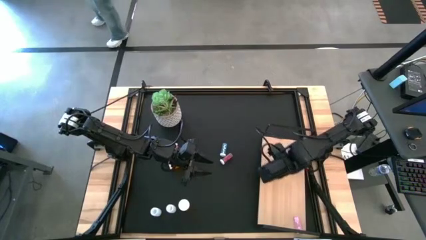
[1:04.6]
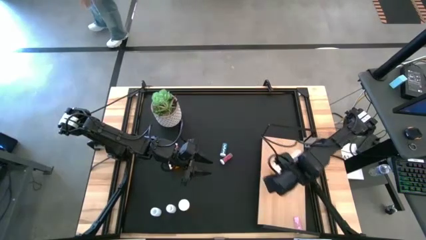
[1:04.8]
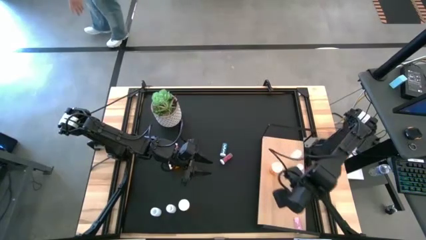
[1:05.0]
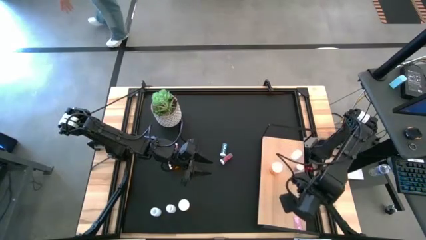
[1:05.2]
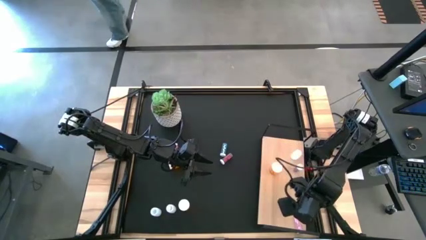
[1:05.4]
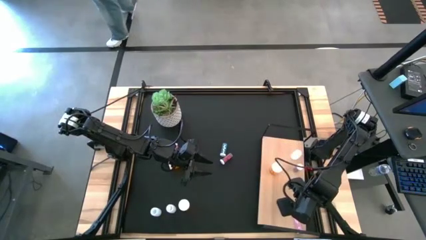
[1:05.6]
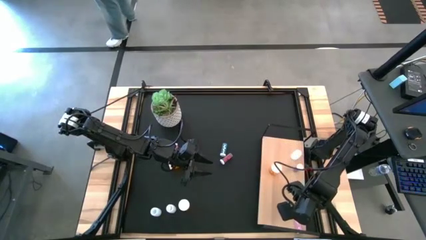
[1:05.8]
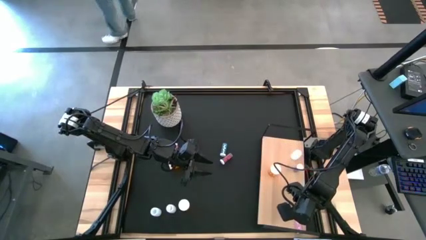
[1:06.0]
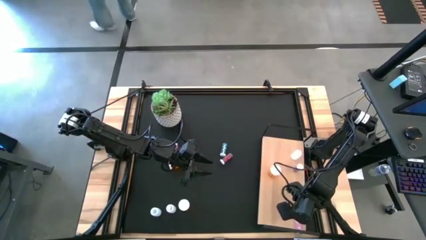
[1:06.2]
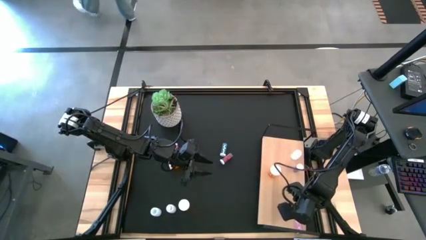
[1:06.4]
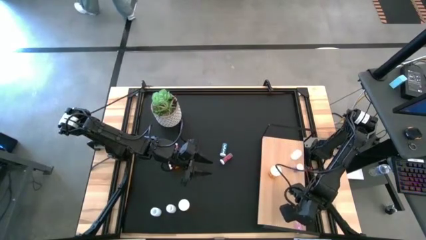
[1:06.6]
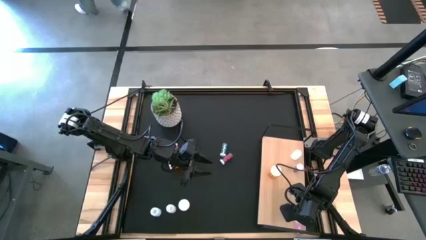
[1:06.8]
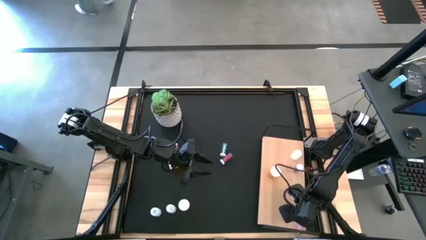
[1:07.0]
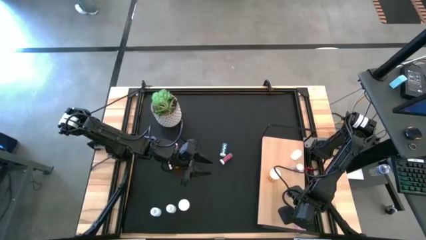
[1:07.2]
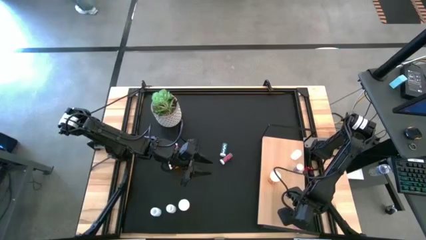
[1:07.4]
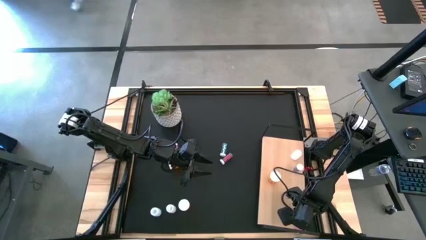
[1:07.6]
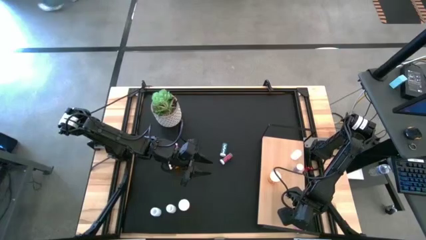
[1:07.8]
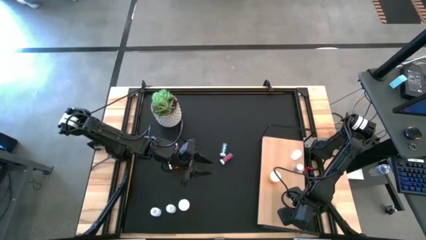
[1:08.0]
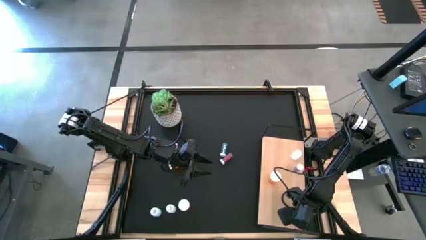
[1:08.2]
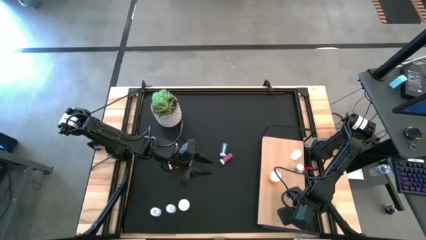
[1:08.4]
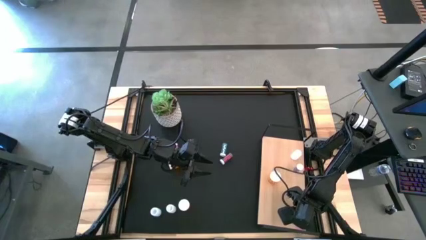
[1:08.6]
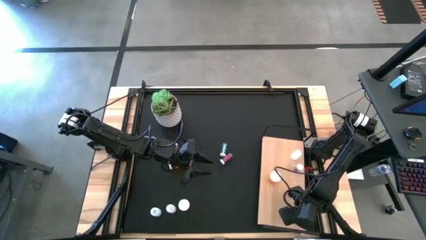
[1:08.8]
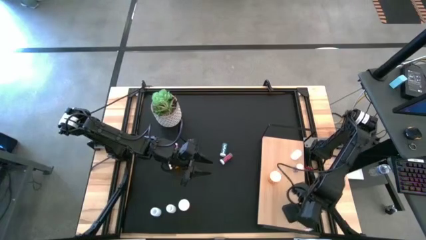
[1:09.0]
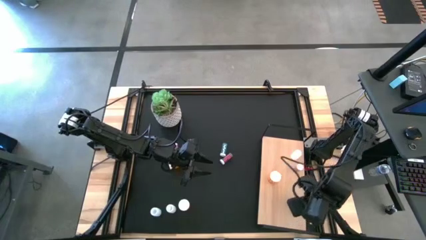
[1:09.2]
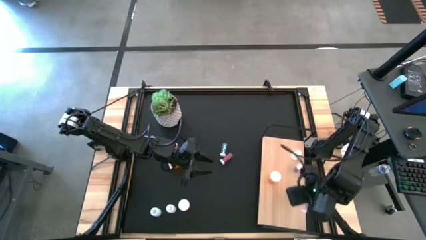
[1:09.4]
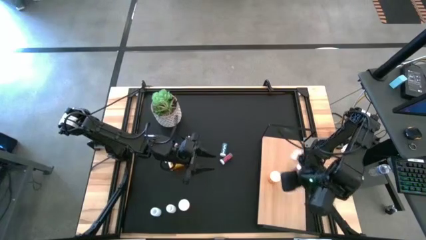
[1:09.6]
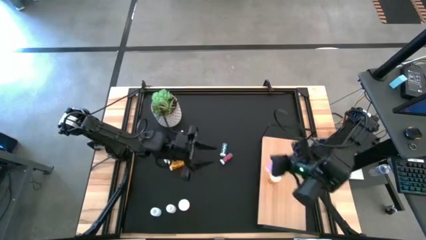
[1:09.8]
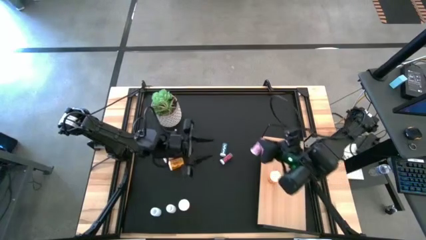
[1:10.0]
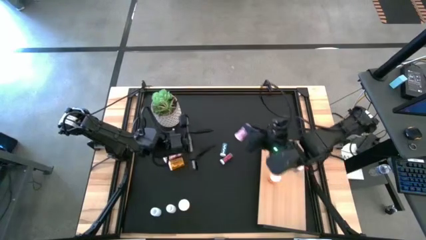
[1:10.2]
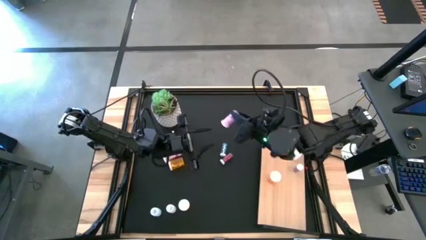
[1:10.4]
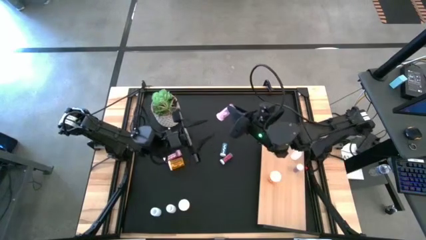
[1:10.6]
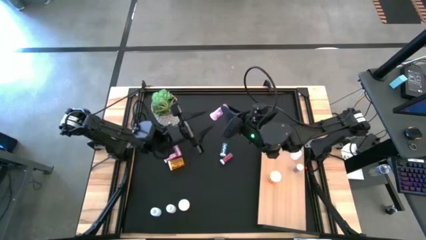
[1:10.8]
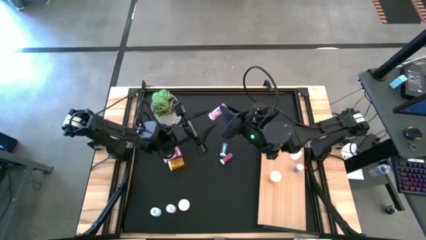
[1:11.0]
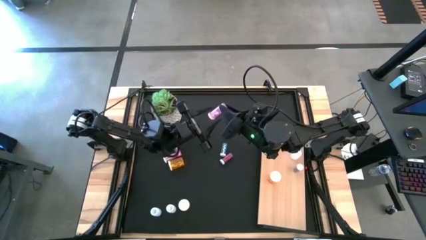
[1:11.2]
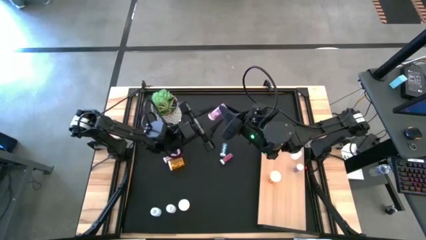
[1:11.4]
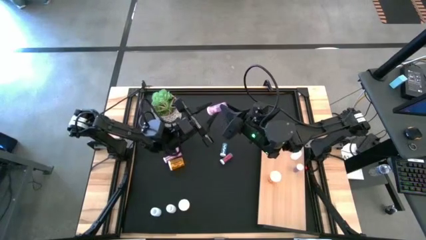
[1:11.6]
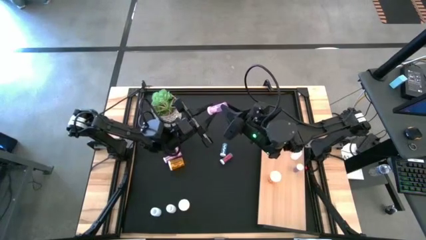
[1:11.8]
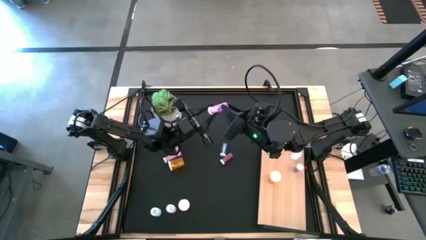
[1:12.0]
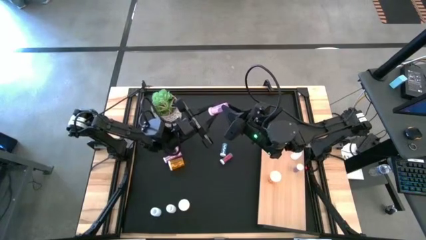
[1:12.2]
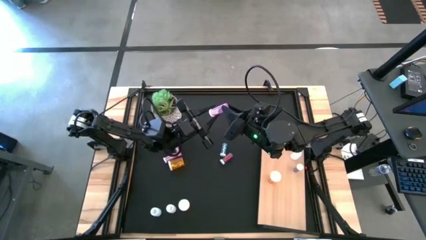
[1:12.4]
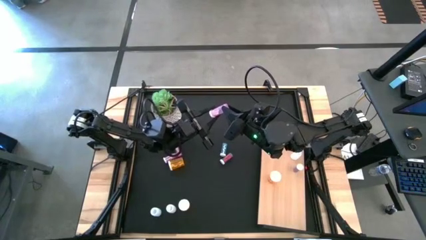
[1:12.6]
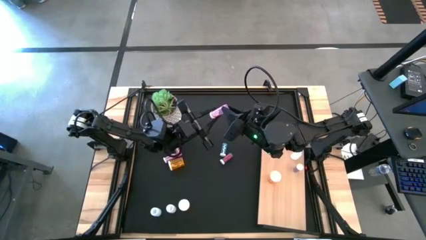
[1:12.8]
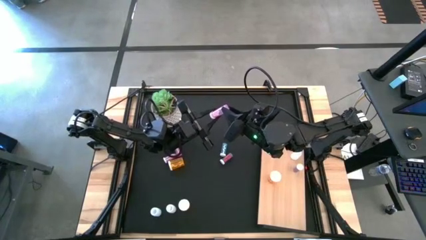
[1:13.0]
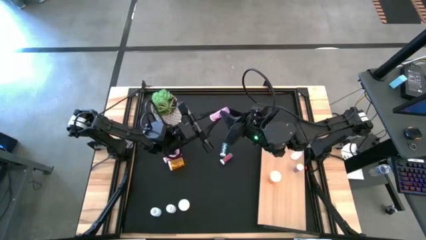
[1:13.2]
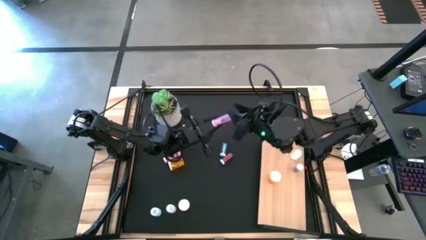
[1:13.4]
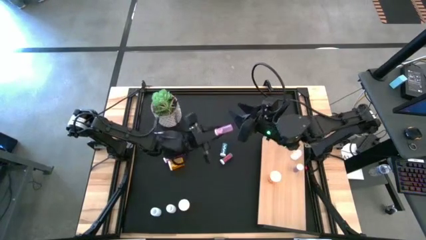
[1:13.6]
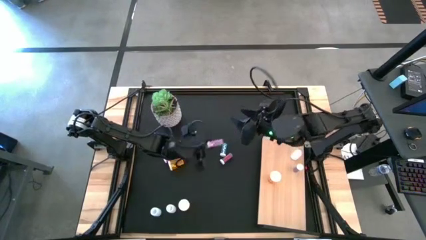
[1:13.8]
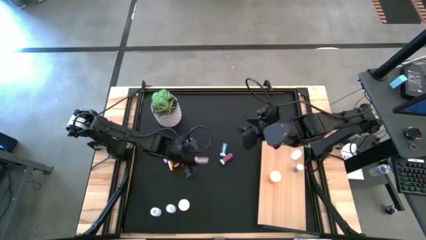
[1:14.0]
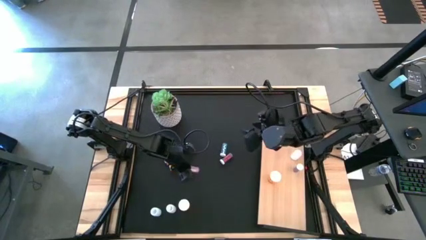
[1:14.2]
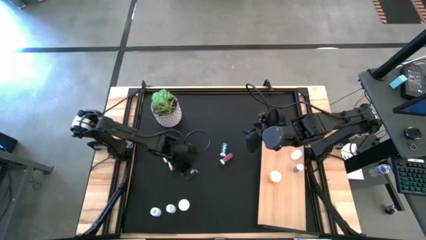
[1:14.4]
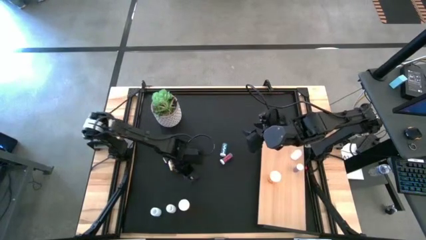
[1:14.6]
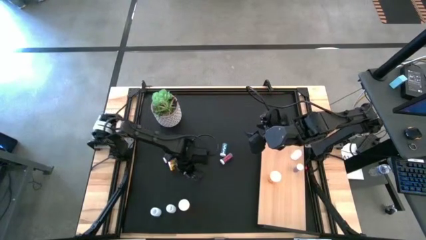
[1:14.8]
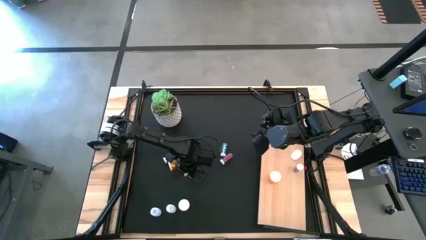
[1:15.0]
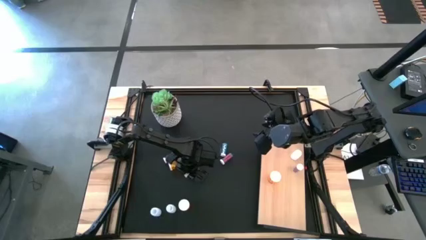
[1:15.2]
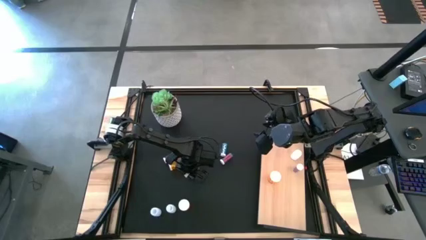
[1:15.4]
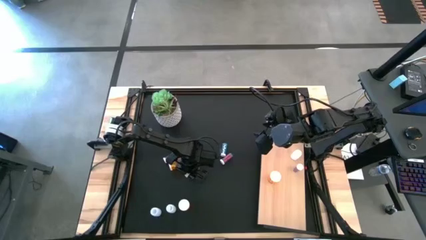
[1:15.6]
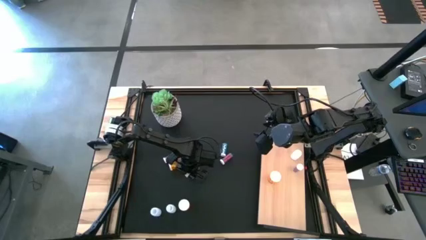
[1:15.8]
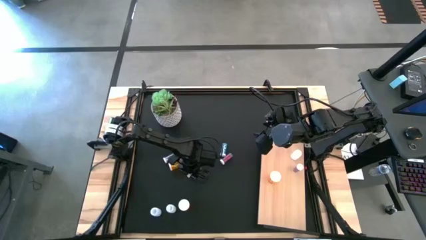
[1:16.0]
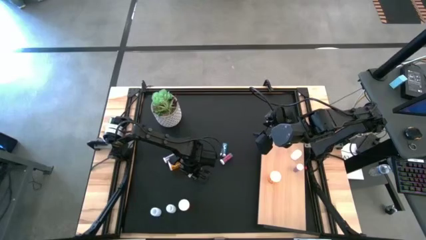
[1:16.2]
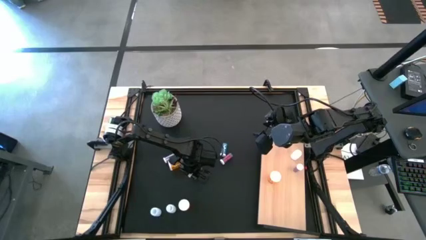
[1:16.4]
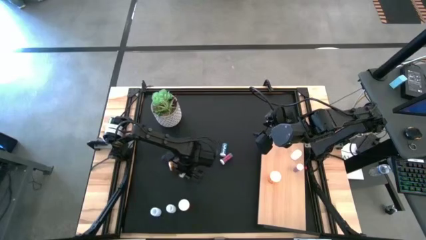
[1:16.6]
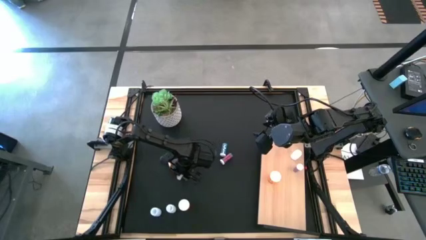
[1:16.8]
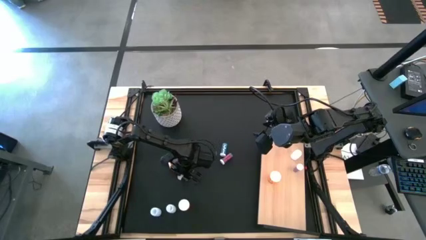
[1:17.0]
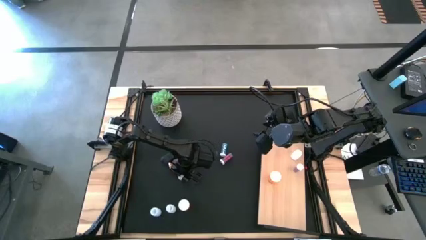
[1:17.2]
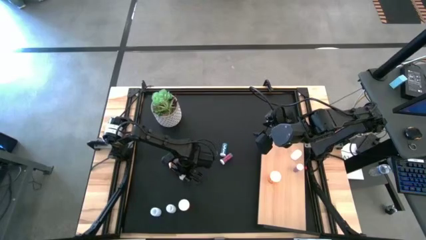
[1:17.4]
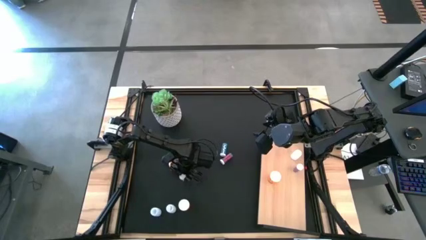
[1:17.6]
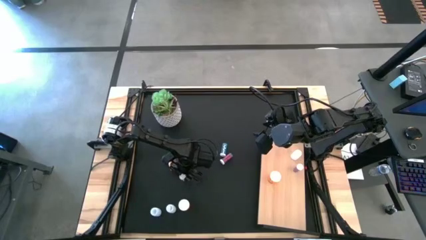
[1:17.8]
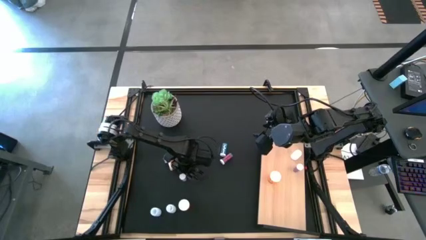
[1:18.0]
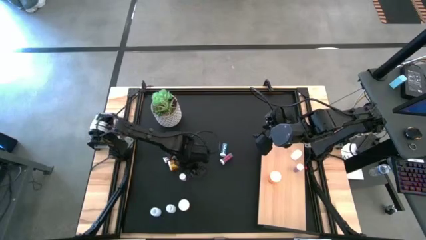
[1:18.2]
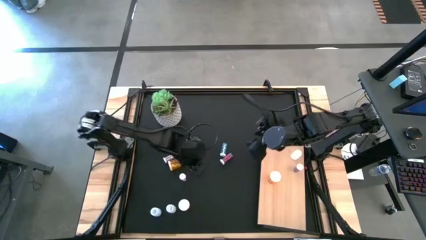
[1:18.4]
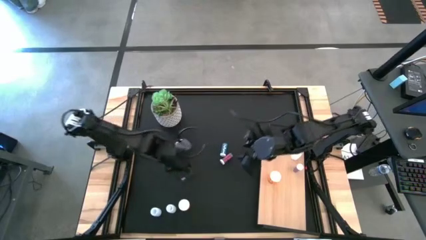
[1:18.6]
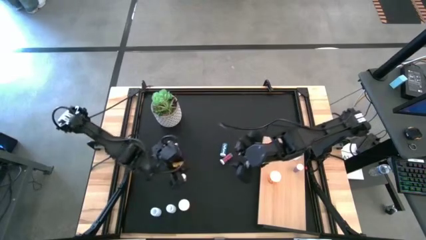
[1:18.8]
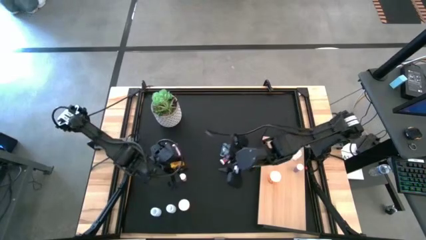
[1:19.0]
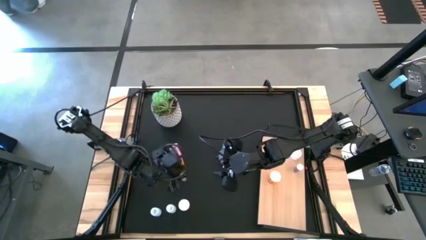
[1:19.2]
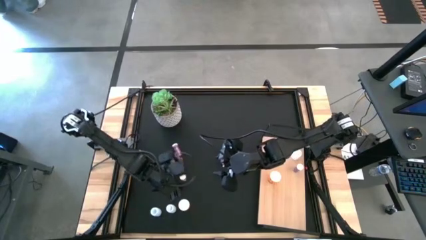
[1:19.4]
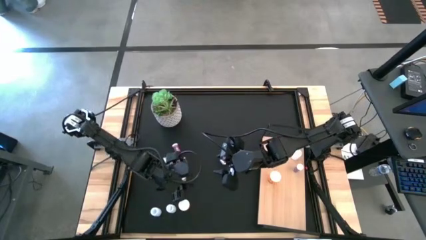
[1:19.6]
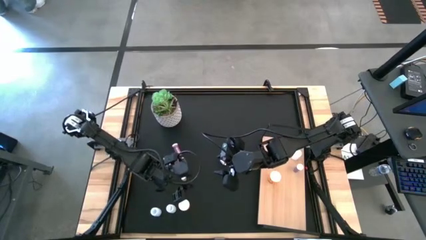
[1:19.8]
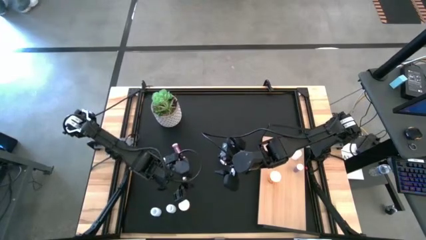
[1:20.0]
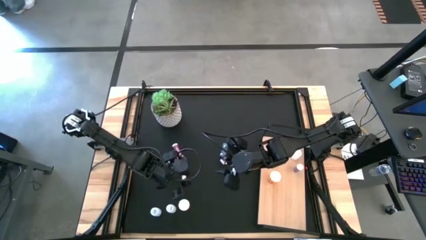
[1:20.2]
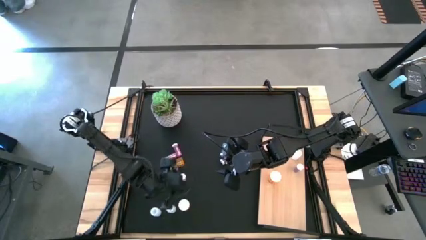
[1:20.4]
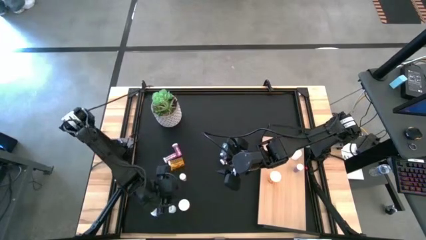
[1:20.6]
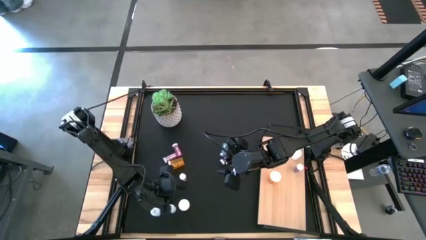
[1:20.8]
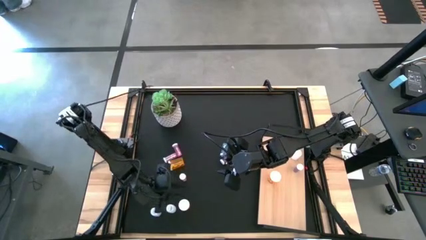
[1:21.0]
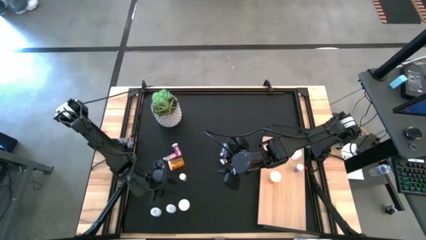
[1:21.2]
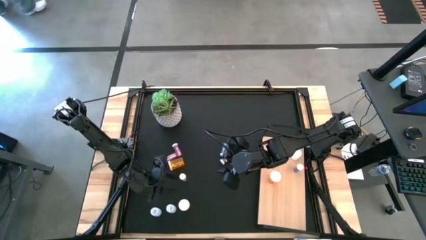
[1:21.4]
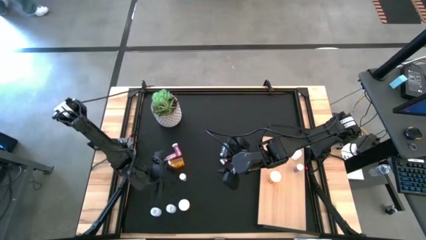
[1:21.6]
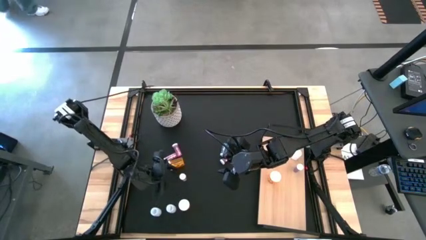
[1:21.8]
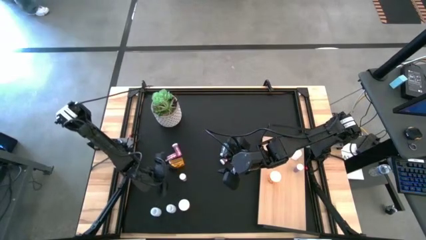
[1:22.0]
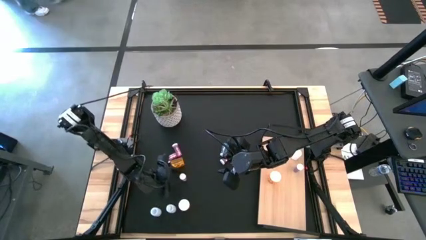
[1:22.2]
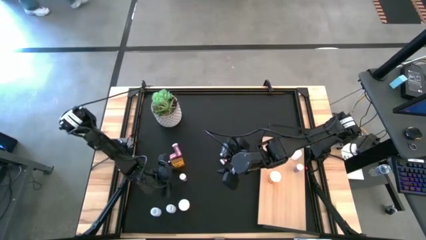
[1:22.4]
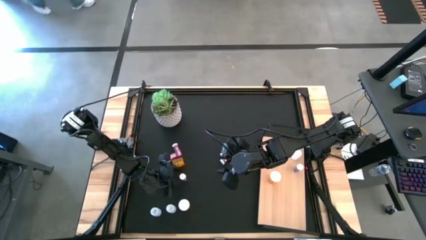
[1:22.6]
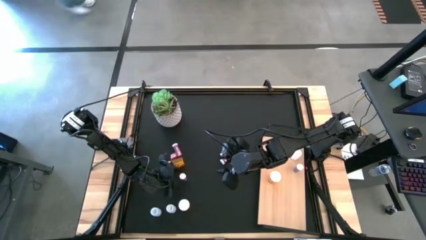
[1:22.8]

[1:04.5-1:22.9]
Task: Pick and place medicine bottles onto shelf by color
Put the bottom right pink table bottle on the shelf
